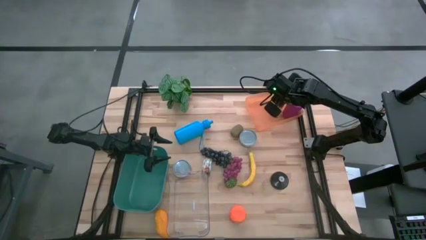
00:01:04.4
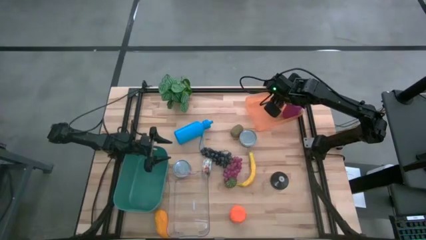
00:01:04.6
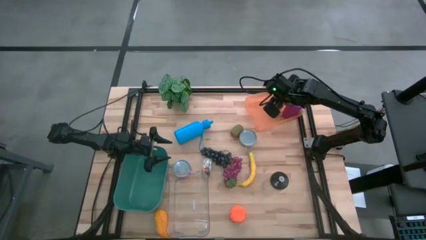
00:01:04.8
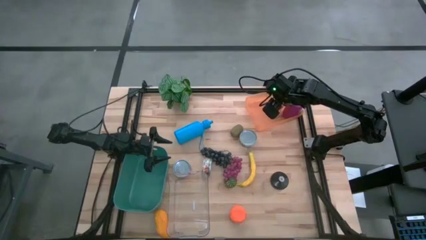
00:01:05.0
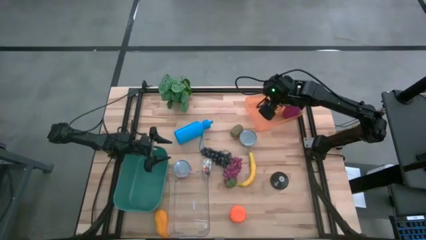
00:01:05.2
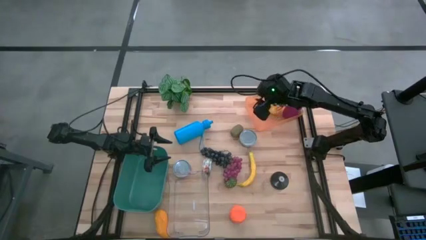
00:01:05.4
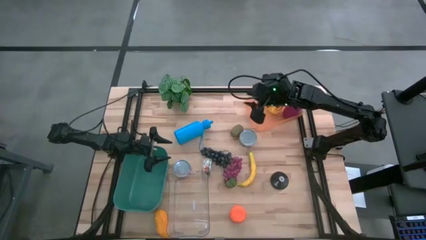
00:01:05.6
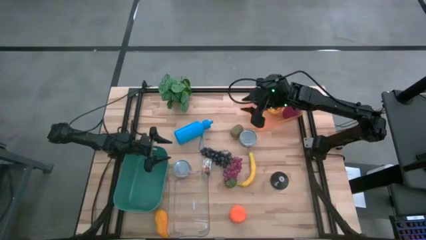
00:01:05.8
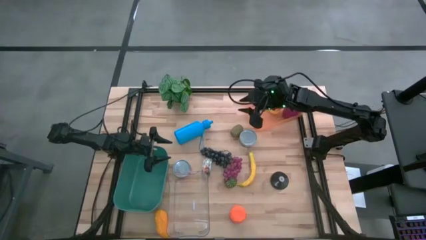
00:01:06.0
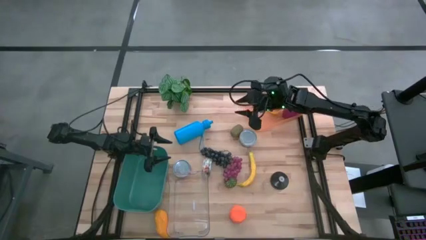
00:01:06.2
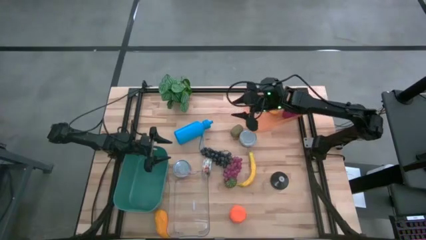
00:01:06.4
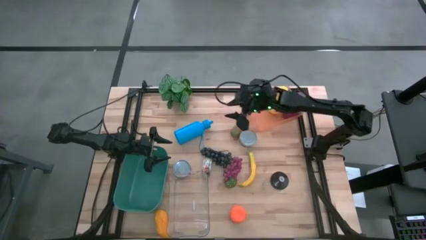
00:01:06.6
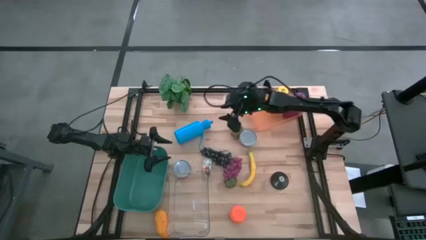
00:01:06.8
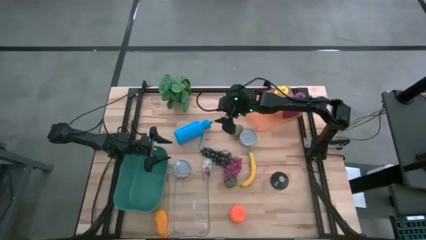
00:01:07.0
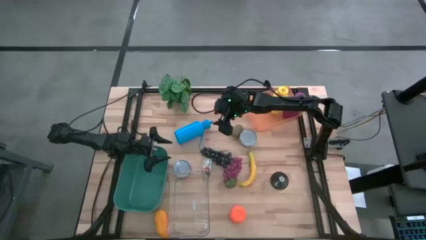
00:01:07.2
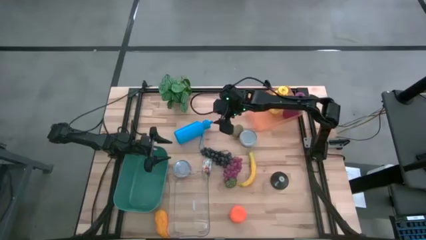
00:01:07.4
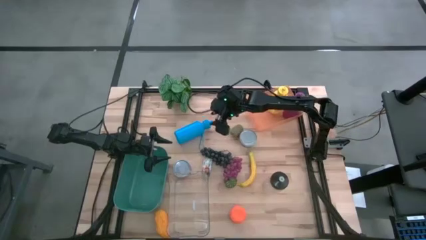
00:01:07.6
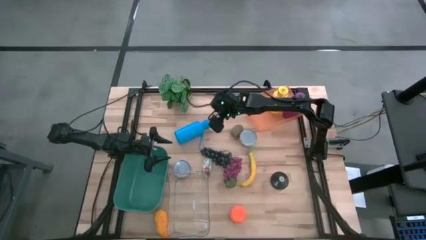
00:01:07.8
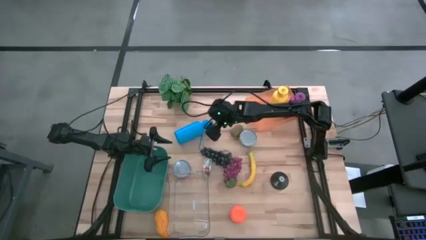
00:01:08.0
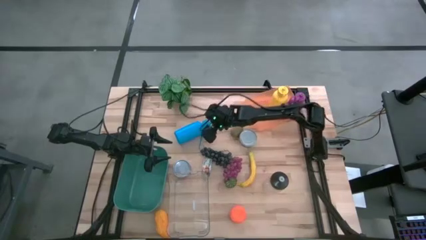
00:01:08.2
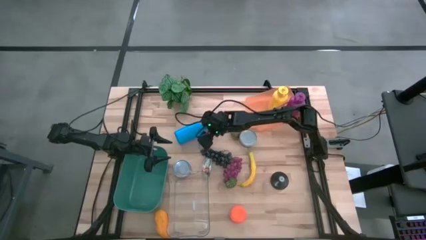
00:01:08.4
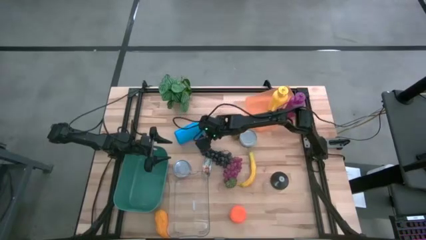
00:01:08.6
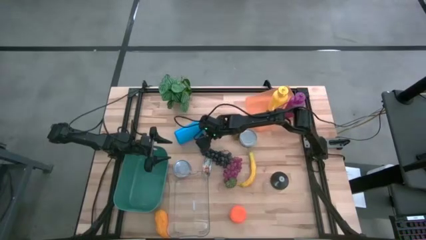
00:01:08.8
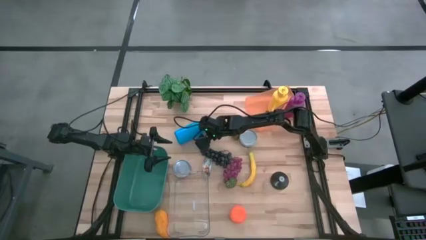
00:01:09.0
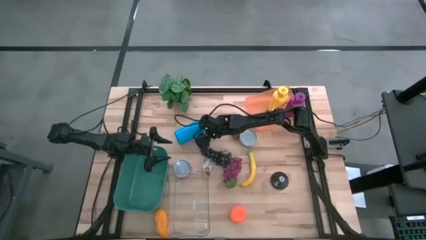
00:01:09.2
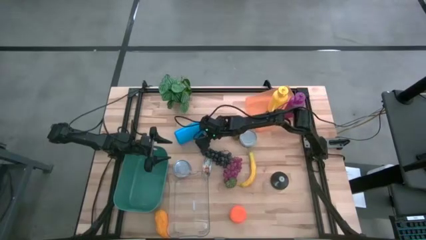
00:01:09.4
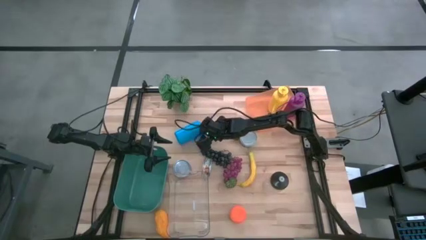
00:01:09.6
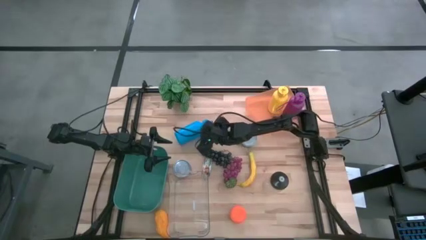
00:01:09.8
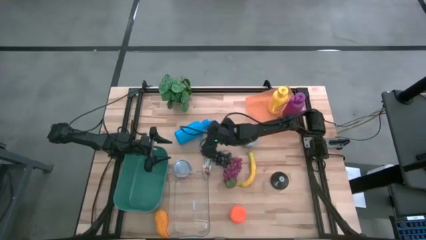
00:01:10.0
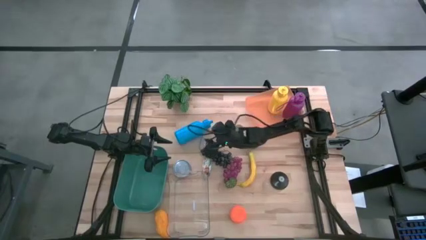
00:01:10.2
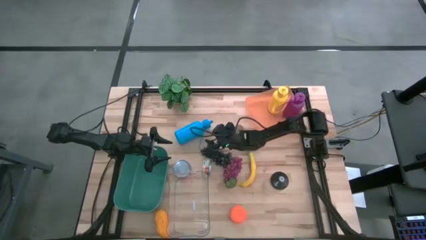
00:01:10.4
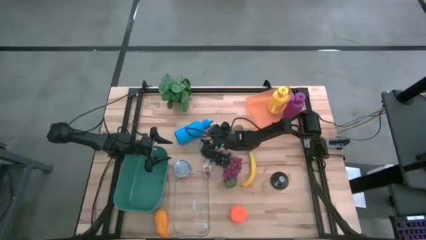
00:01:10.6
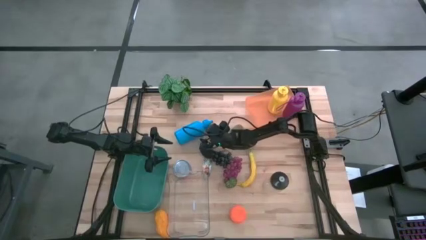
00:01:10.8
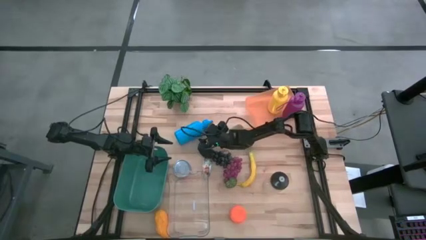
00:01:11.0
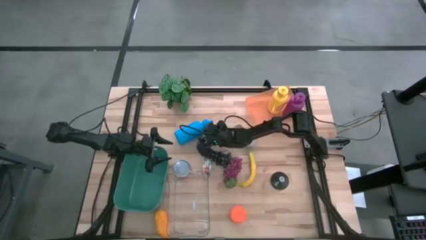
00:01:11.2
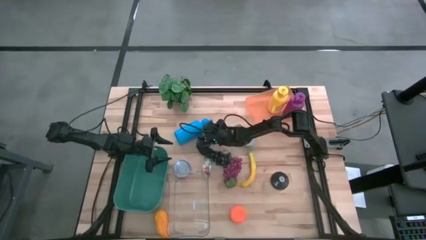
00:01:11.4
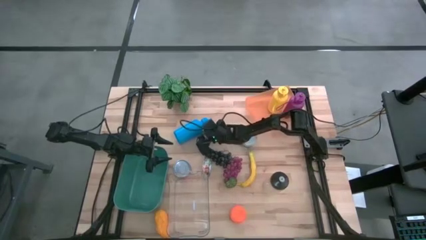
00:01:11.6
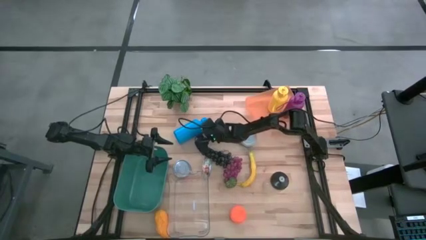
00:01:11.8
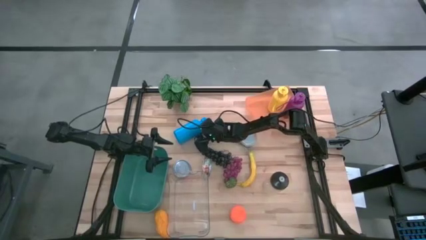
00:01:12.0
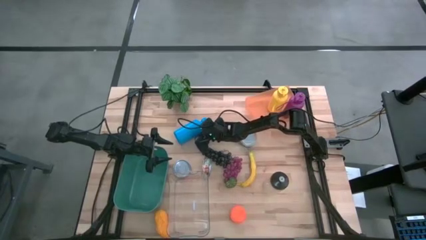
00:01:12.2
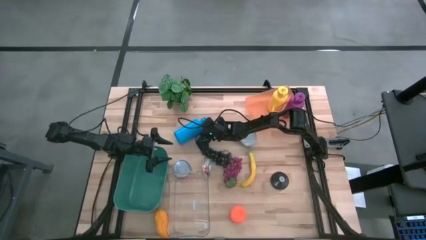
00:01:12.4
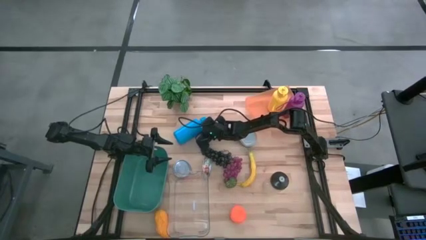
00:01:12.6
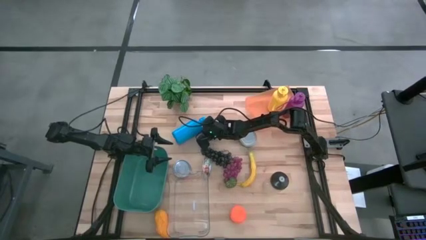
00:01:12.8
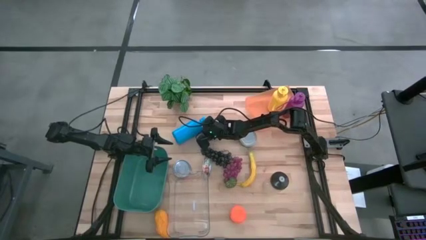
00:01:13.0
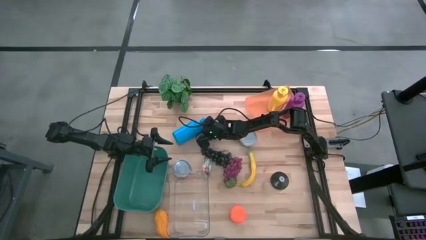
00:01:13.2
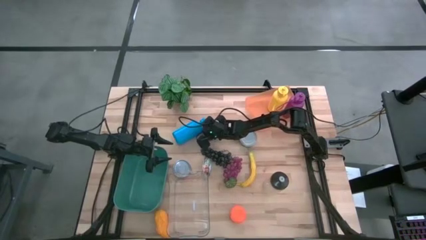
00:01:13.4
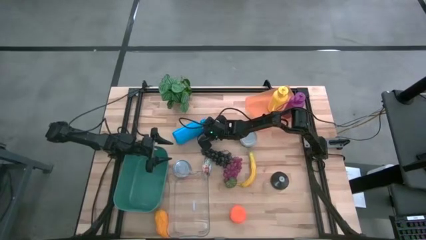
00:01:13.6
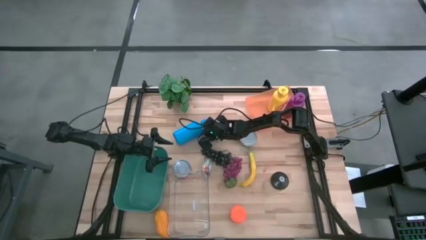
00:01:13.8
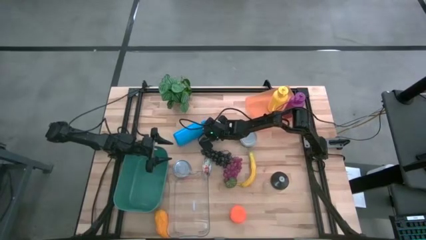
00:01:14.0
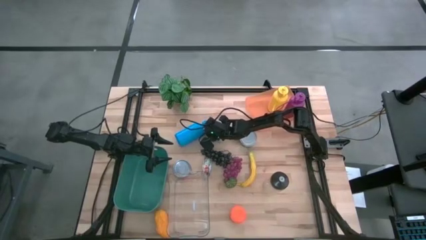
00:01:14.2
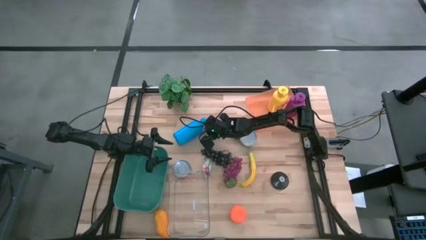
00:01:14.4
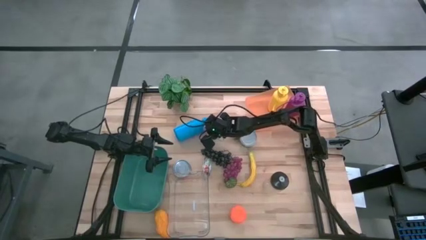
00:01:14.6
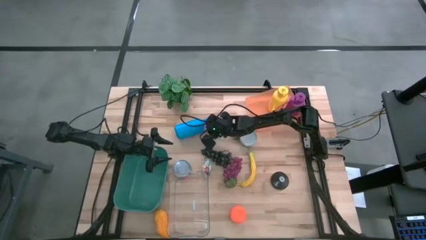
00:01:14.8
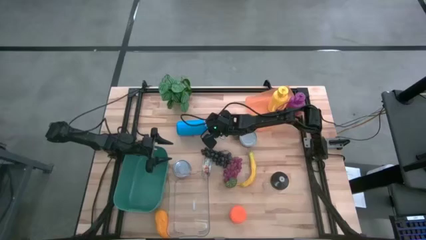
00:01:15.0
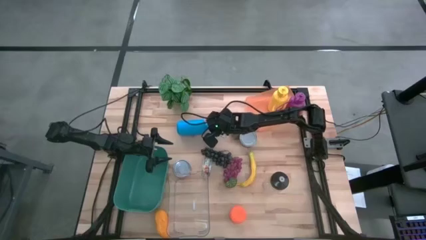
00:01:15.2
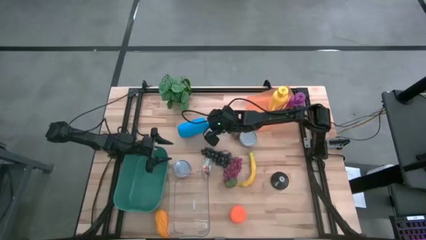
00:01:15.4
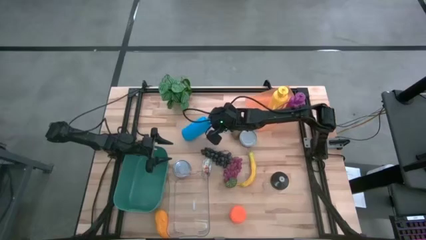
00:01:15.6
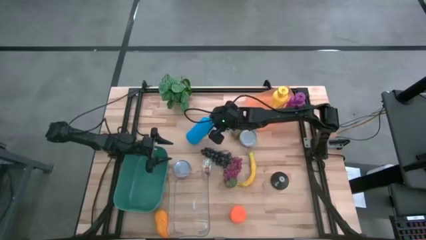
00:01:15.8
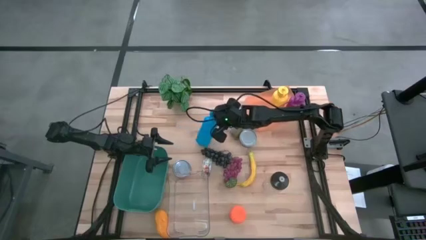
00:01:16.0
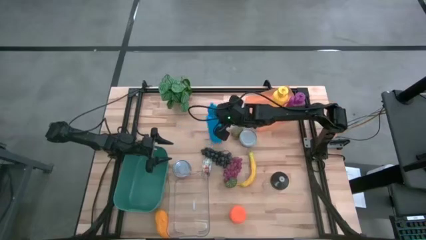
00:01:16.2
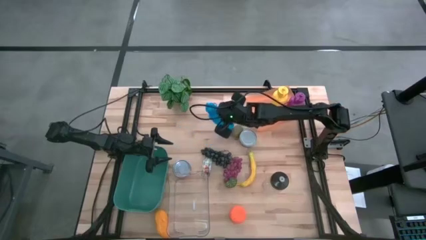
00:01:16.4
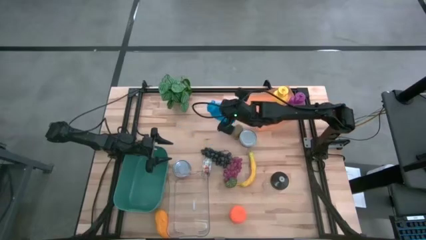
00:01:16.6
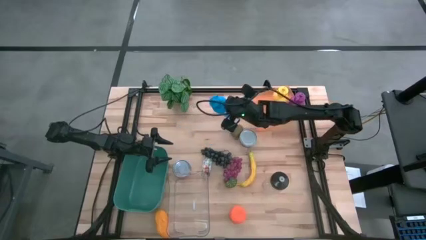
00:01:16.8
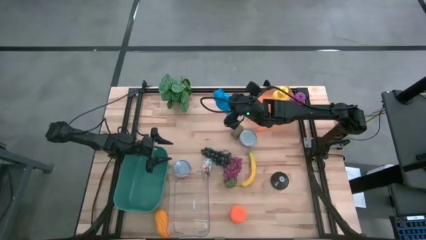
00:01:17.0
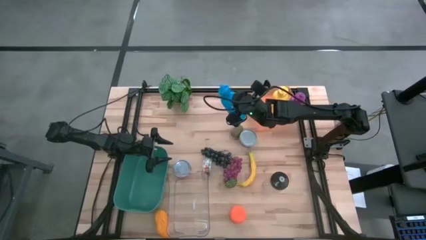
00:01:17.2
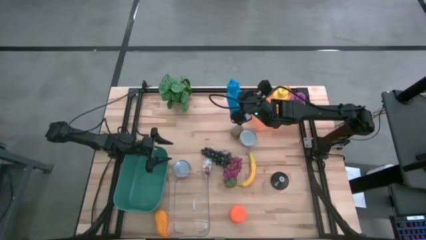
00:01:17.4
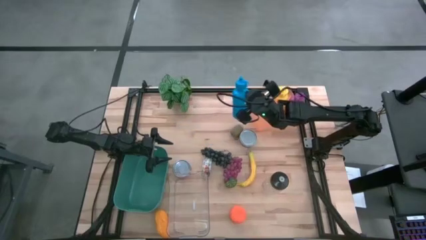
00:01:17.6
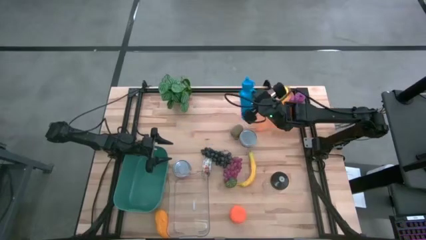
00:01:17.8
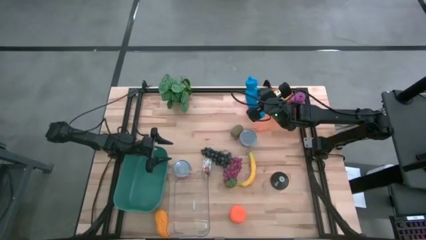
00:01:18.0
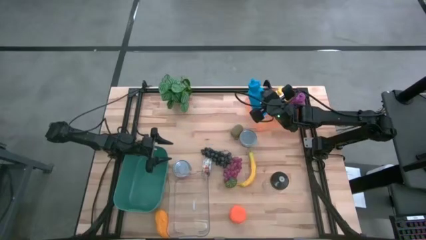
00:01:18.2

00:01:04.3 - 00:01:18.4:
Task: Pick & Place Food Item
Put the blue tumbler into the orange bin

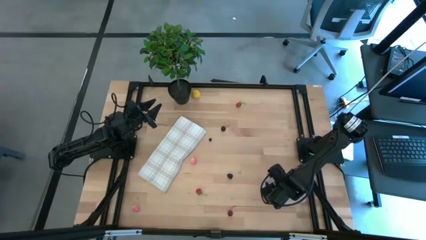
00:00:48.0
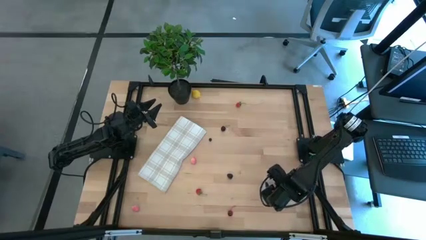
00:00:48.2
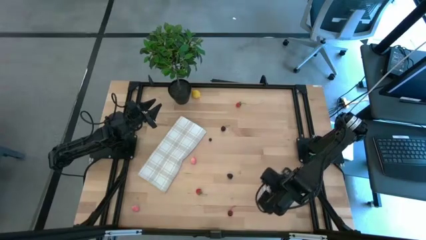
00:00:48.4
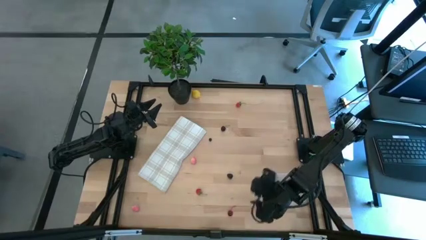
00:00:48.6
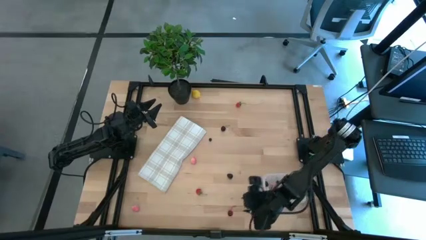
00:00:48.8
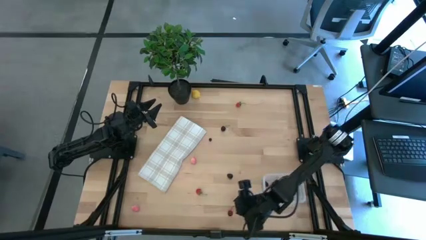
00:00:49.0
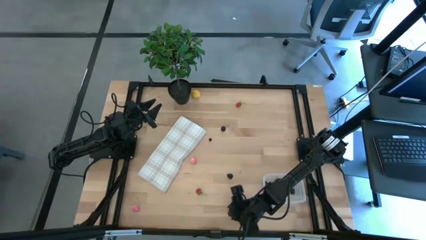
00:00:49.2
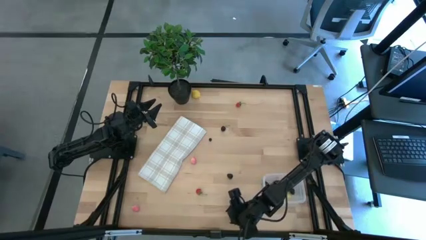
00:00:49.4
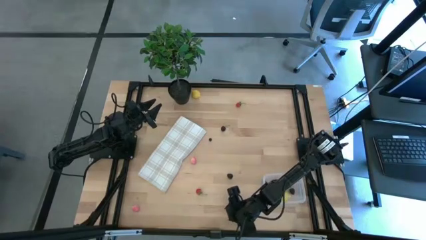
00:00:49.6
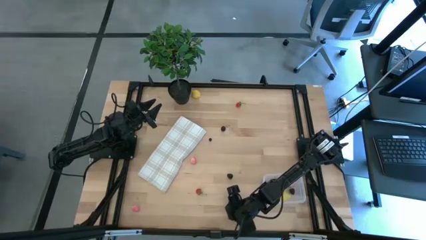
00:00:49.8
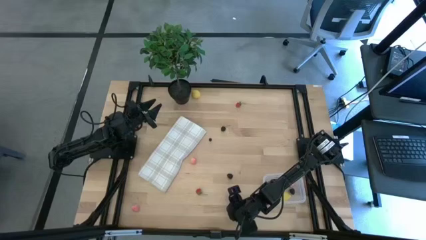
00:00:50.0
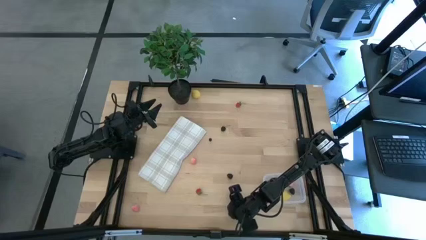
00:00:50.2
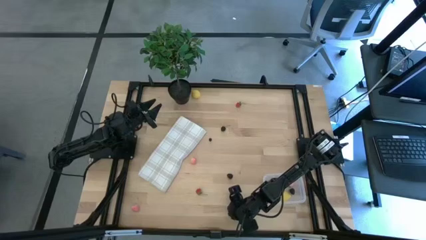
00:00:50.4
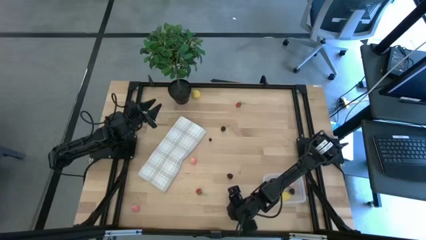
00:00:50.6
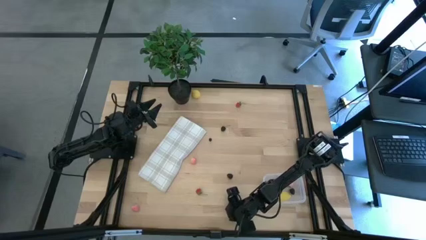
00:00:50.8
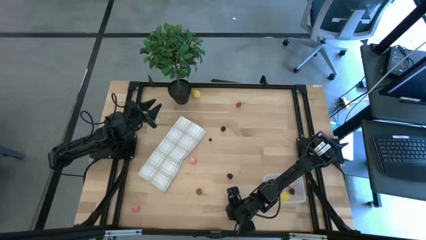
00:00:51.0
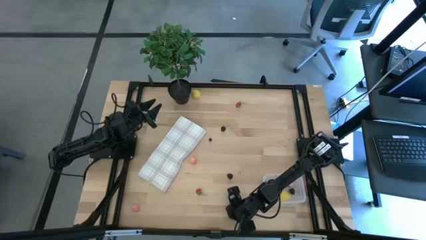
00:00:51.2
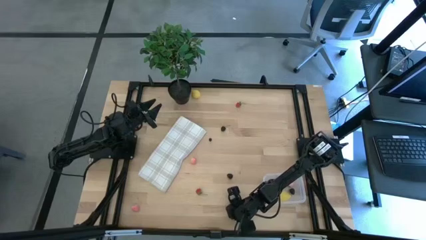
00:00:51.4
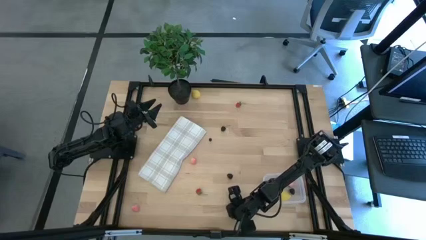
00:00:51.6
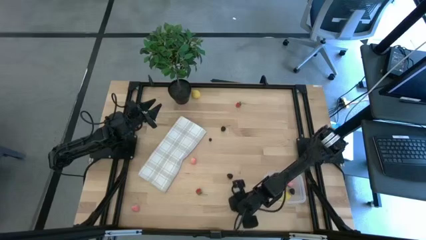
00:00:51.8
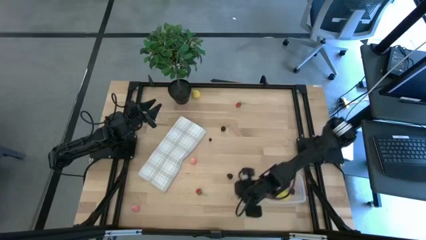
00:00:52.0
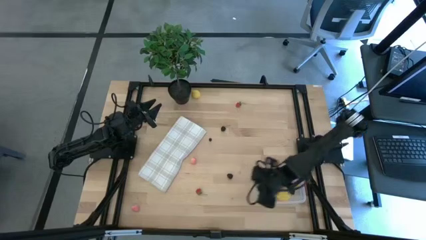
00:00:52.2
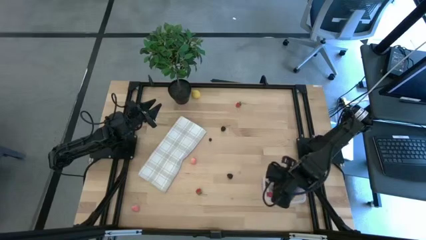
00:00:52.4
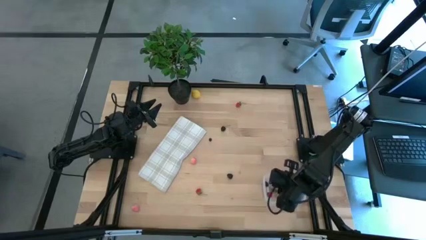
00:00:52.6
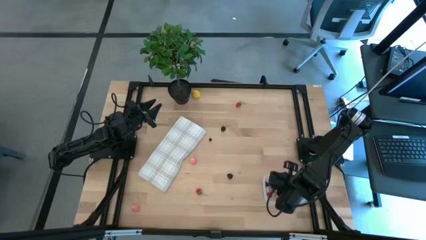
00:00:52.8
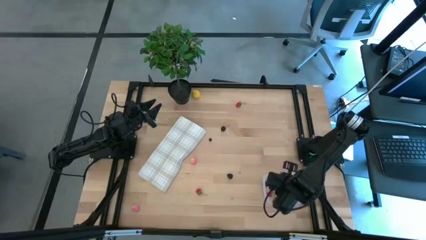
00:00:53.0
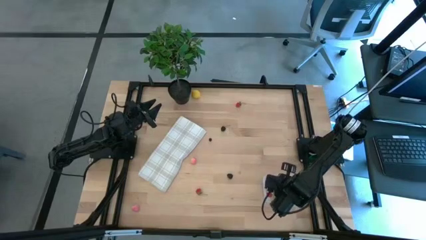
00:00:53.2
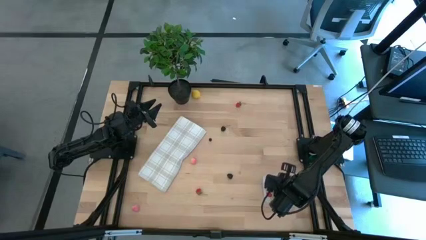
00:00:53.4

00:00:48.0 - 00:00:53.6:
Task: Pick and placing Produce into tupperware
Put the red cherry into the transparent bin
